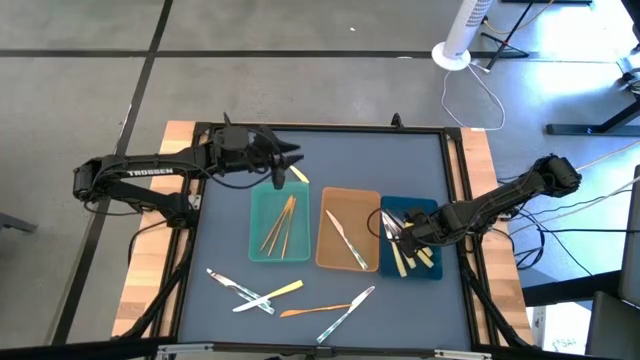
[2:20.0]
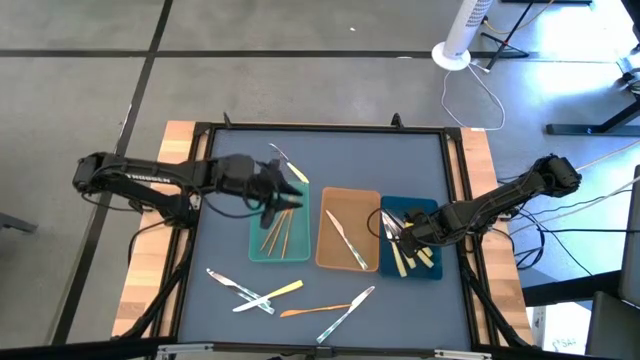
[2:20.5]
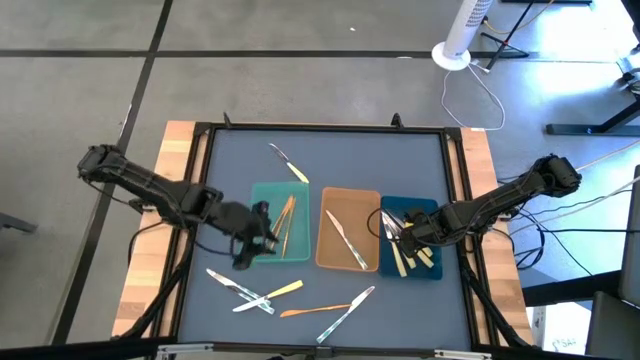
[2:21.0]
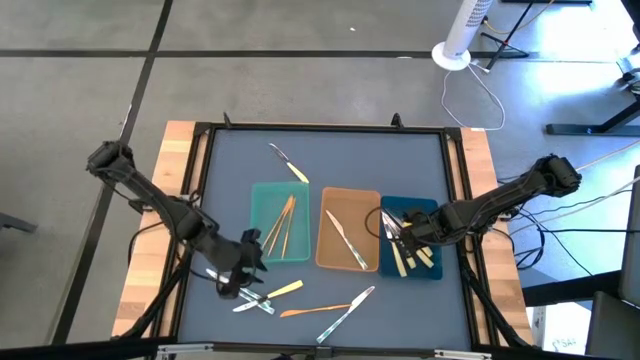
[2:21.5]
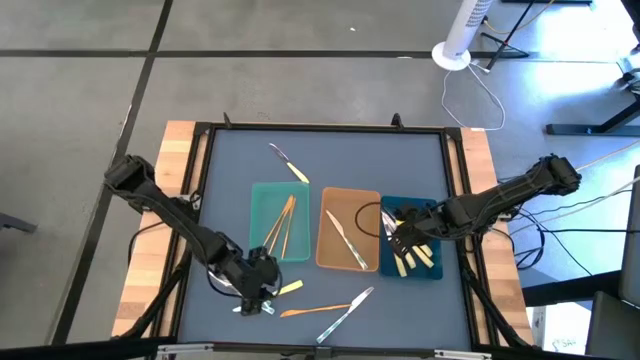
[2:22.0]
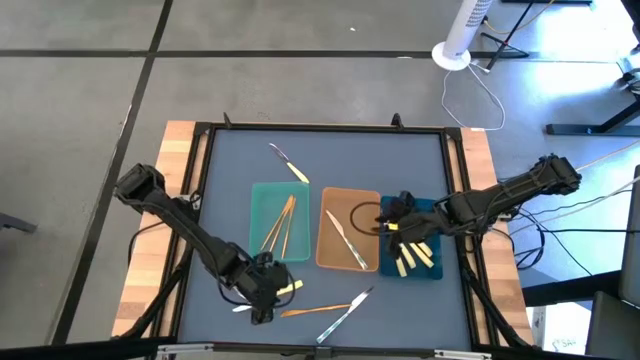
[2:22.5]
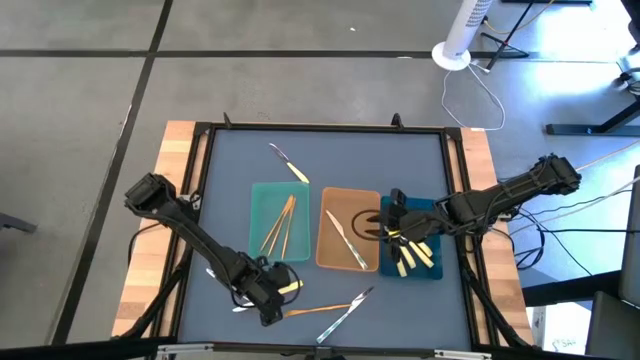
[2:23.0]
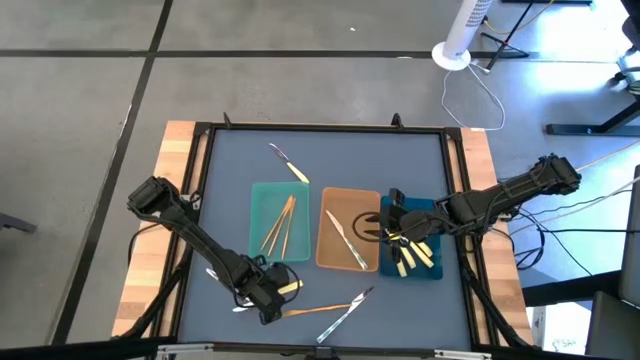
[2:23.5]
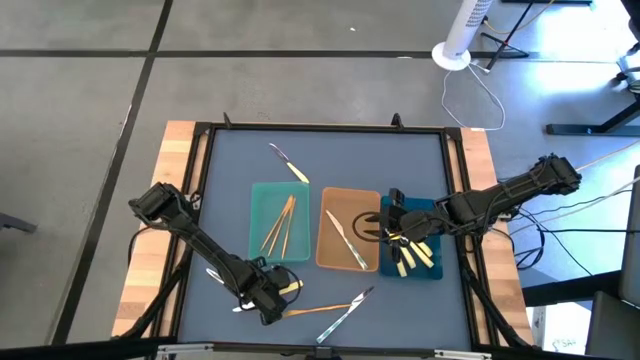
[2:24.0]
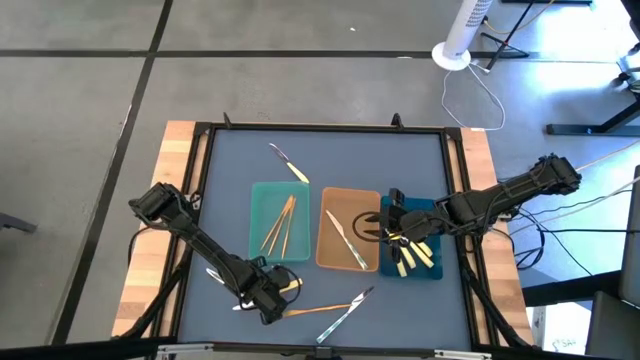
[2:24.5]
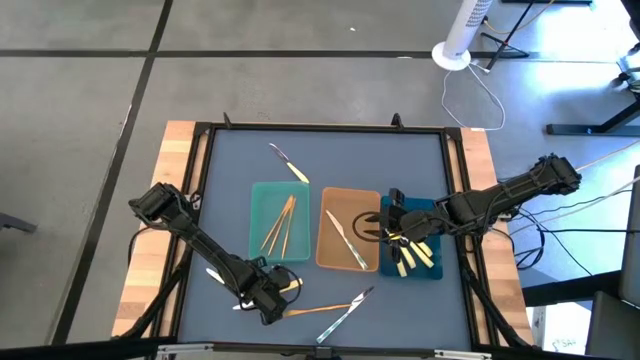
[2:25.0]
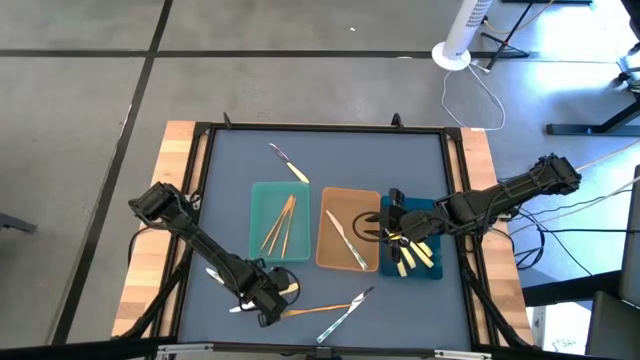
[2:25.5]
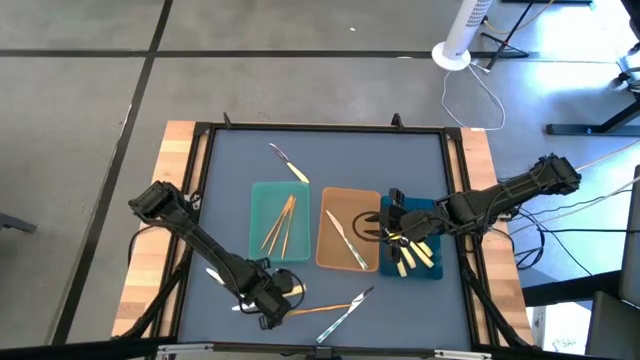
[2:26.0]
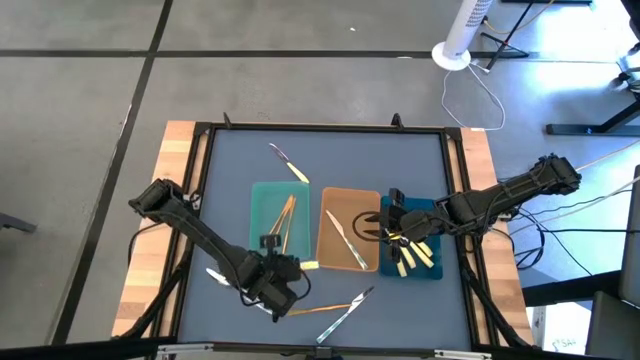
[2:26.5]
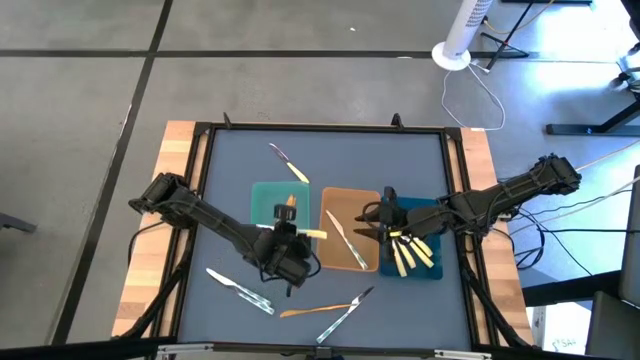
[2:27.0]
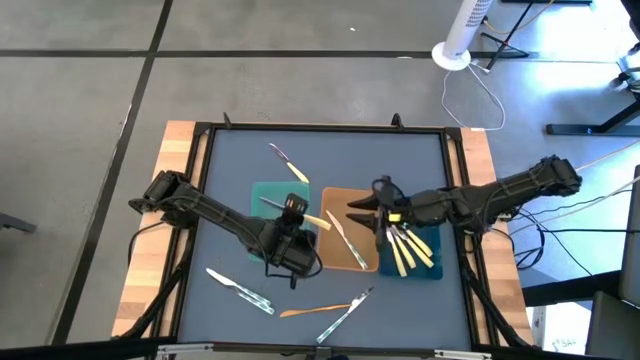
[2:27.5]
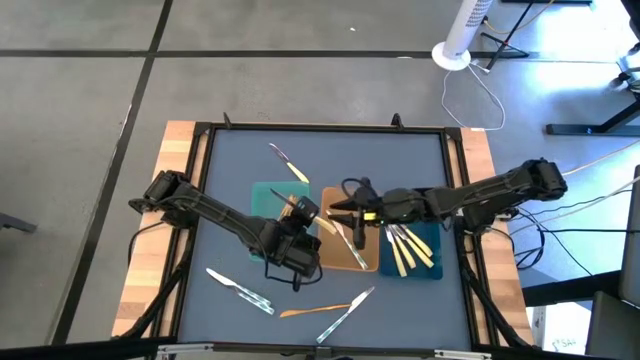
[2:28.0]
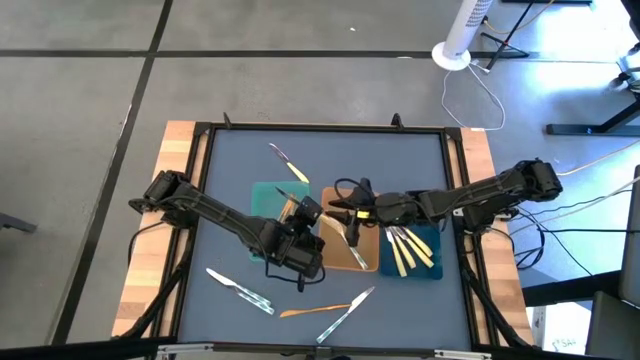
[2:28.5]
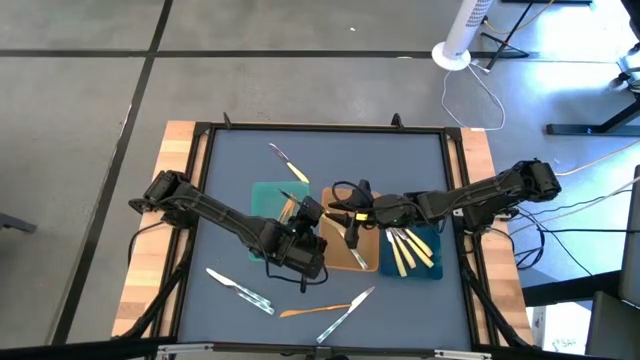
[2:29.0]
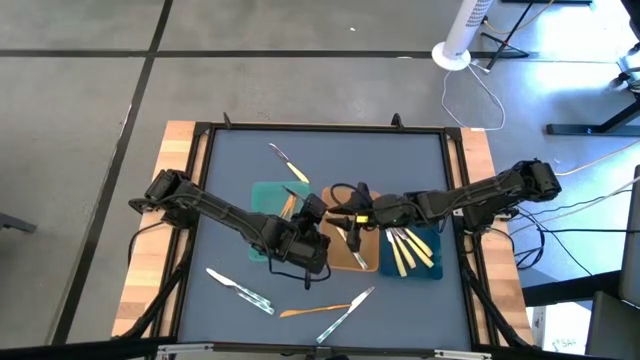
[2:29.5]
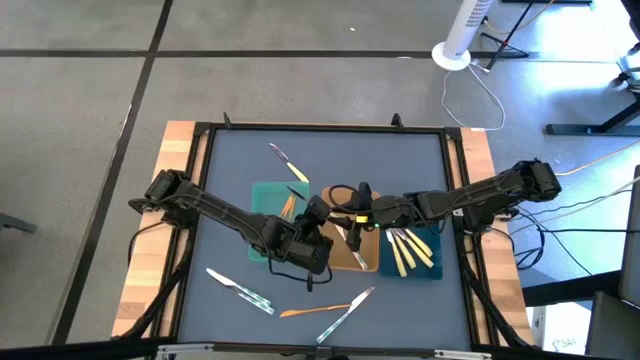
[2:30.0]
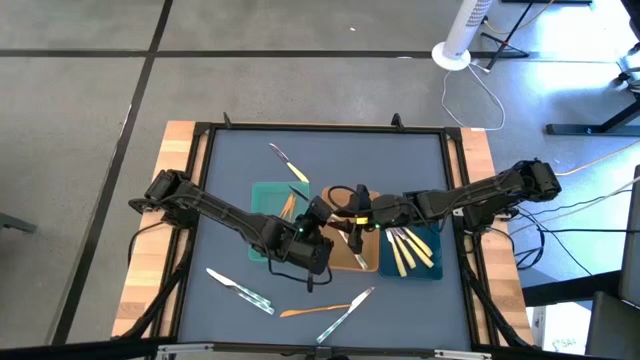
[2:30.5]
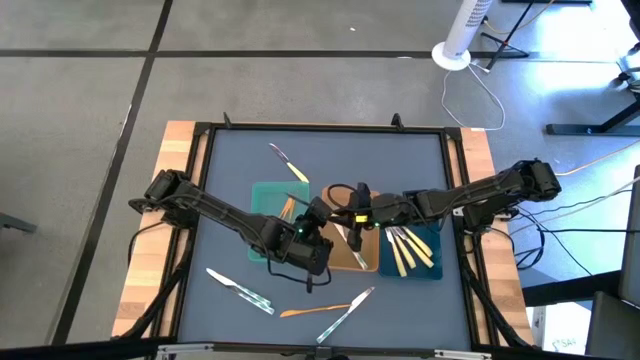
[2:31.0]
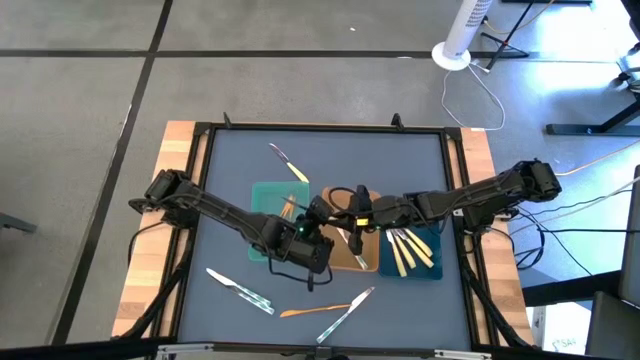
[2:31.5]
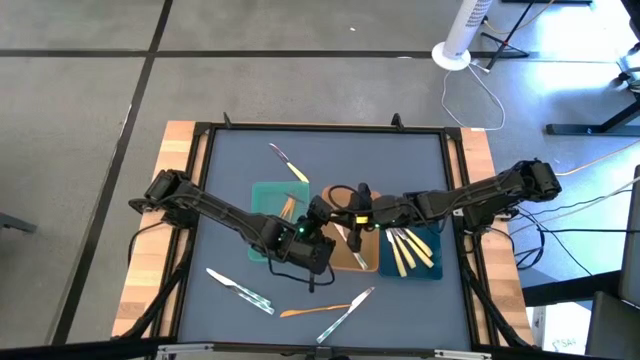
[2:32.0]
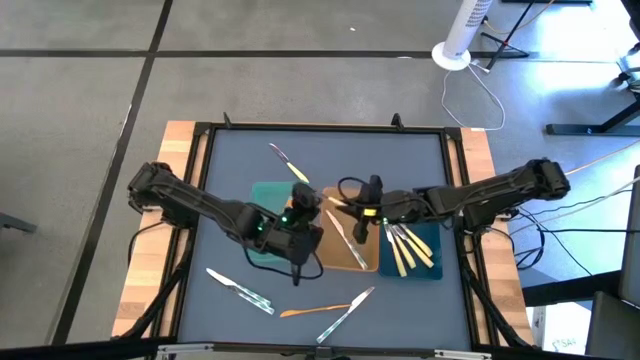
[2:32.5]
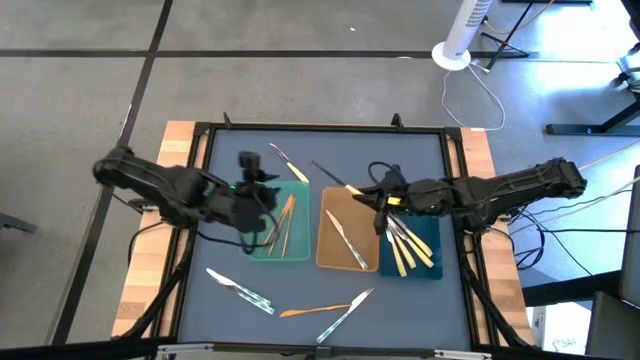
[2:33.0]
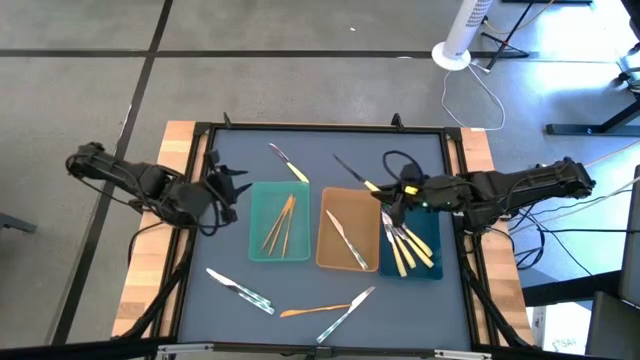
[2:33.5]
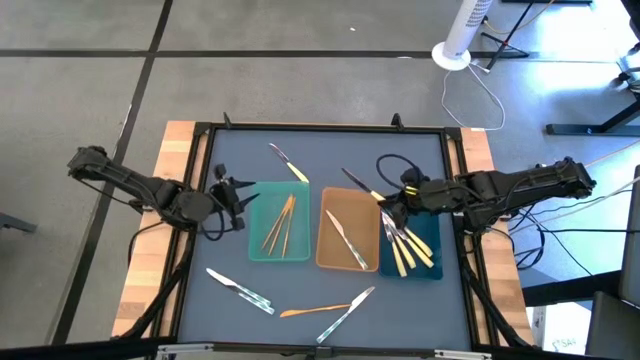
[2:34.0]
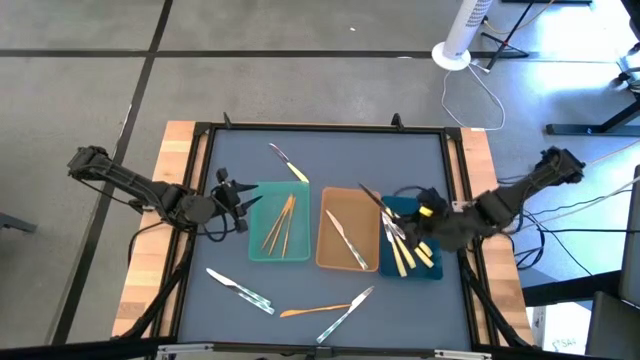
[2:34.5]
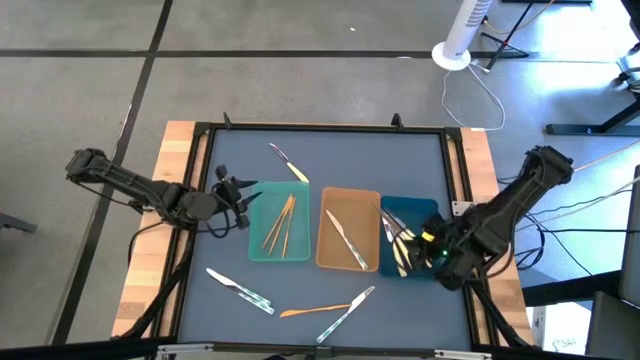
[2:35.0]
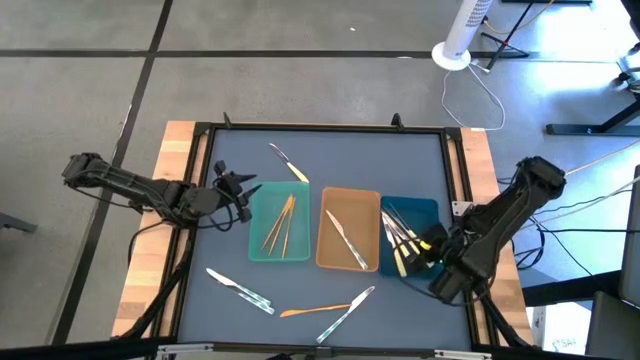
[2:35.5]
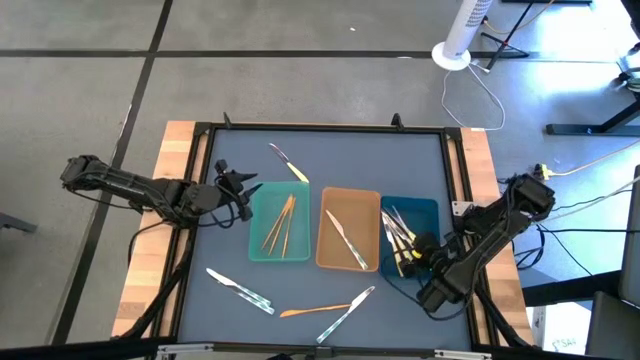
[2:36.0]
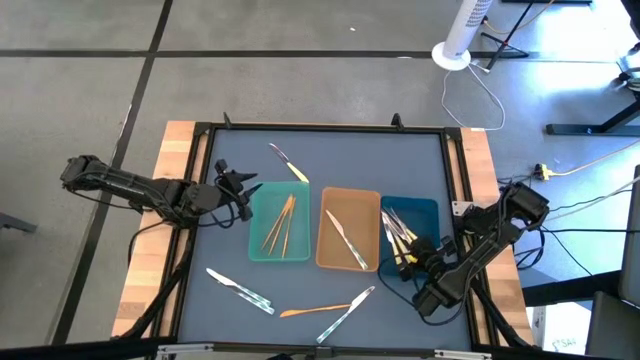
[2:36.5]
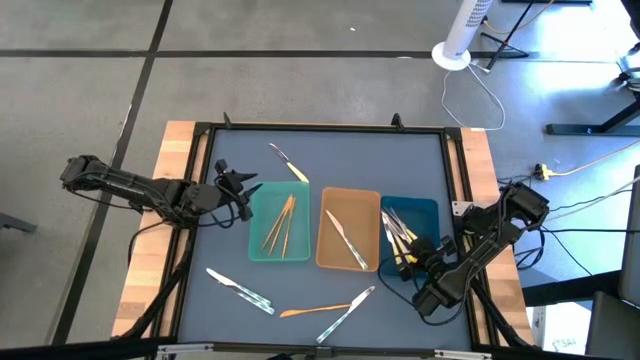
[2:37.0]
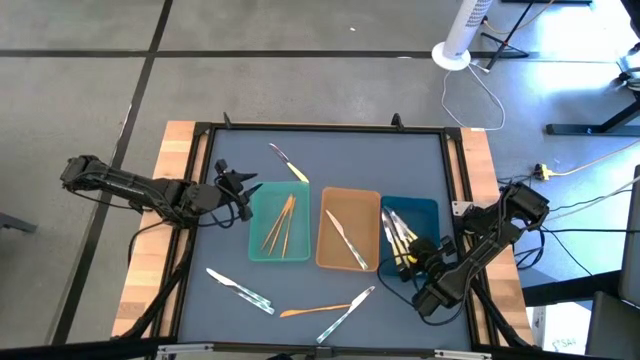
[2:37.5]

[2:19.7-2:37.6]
Task: Sort silverware by color (type)
Put the yellow knife into the blue bin

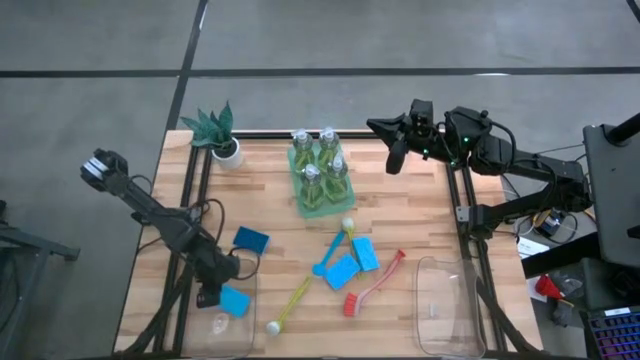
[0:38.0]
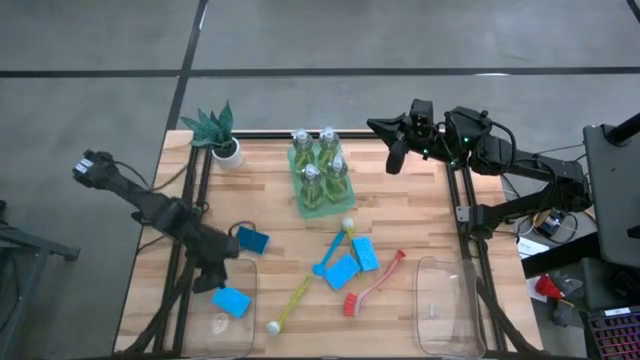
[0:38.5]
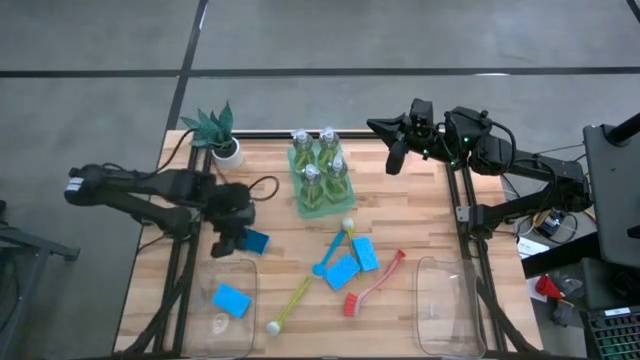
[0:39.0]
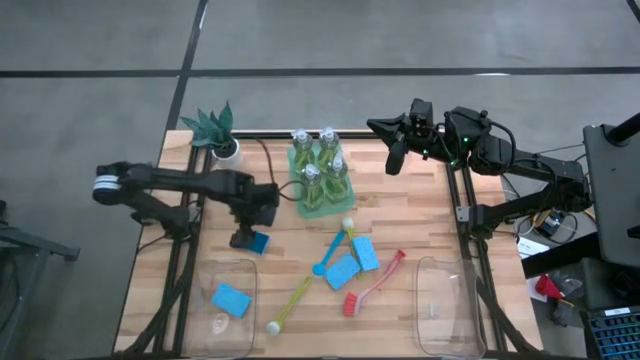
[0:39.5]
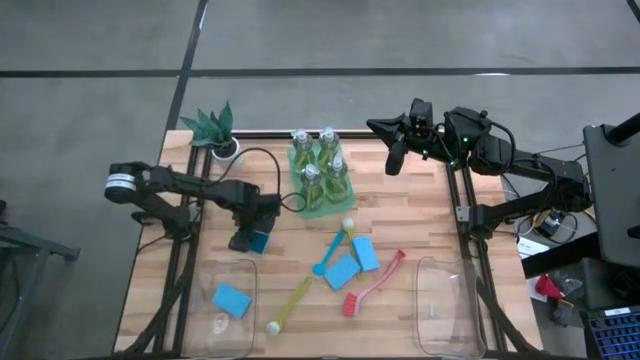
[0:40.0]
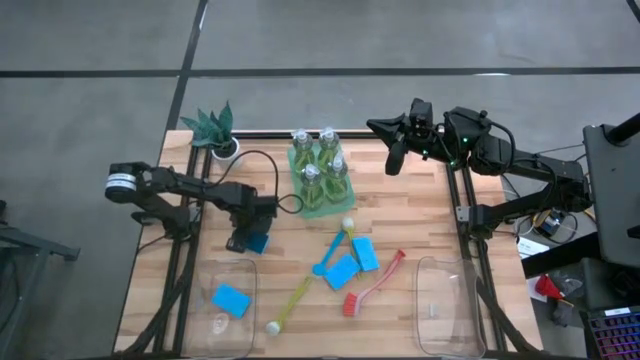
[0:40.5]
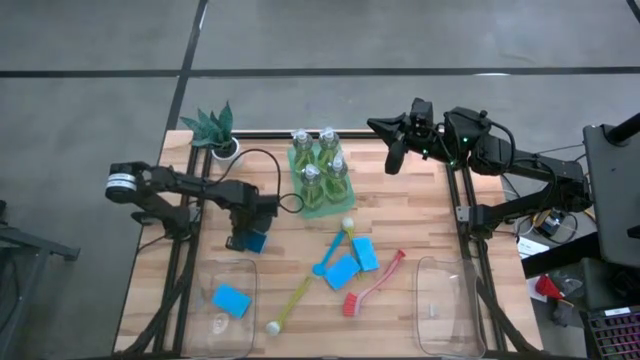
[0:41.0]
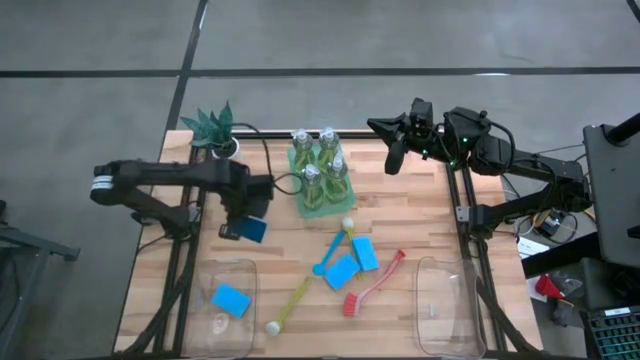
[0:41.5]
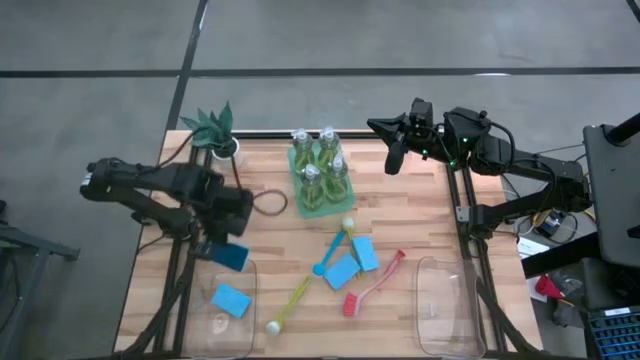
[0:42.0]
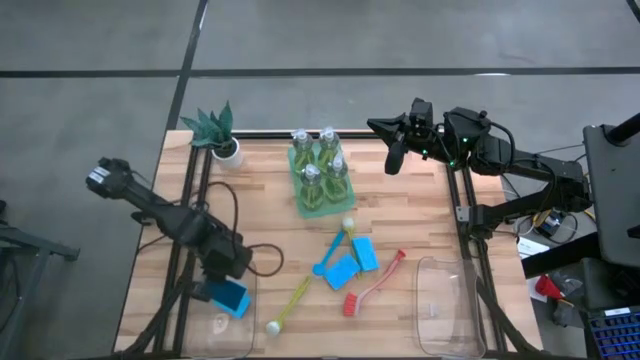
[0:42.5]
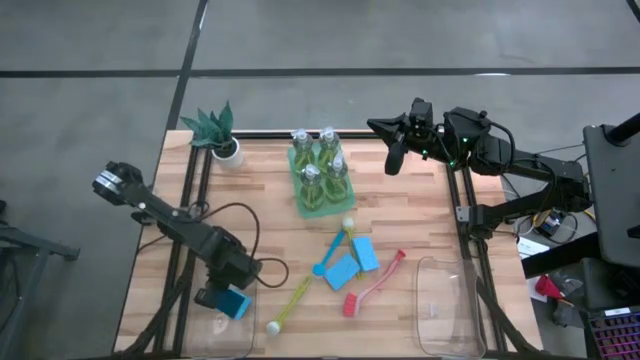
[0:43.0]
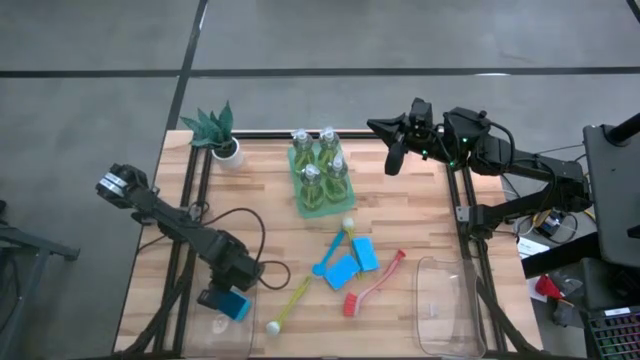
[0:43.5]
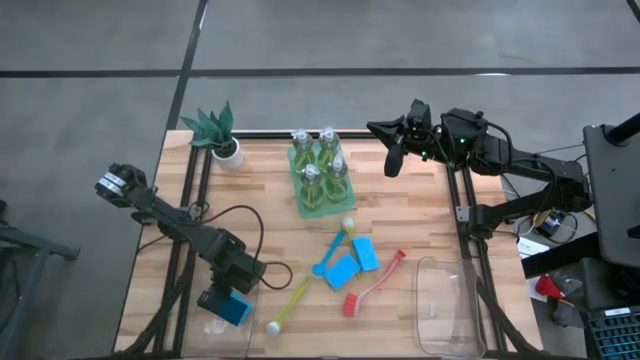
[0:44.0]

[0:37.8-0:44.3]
Task: Pick & Place Kitchen Sink Supplies
Put the blue sponge into the left transparent bin
